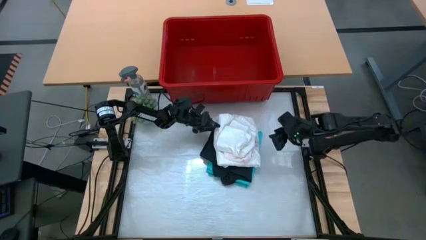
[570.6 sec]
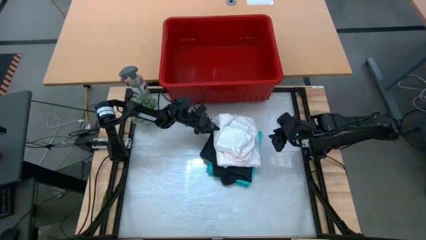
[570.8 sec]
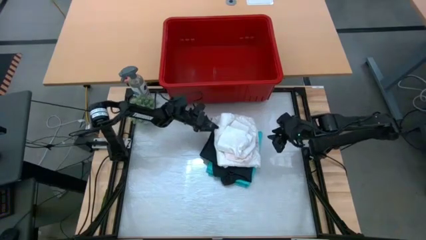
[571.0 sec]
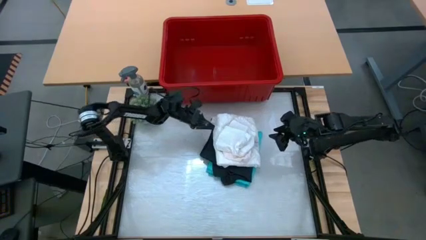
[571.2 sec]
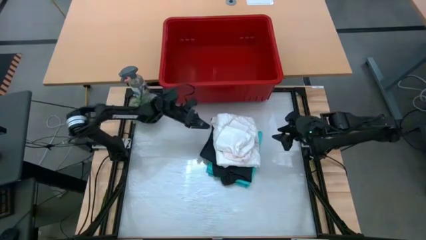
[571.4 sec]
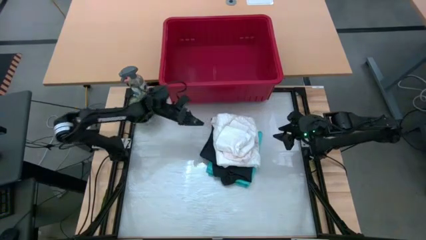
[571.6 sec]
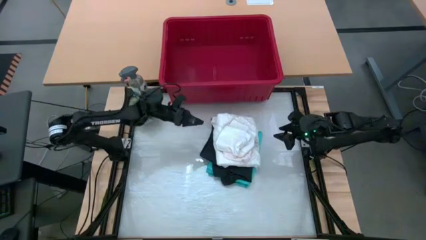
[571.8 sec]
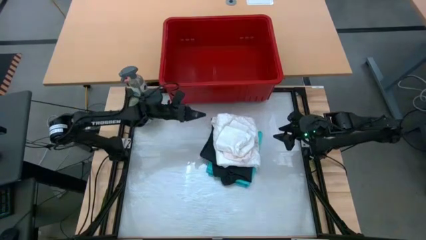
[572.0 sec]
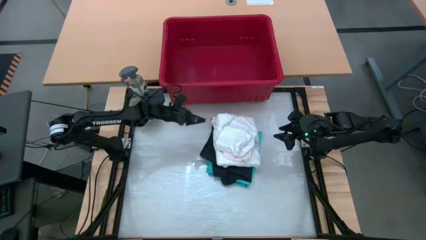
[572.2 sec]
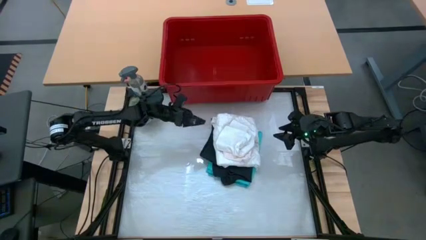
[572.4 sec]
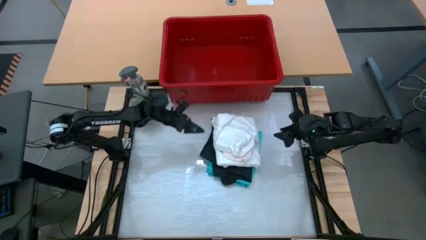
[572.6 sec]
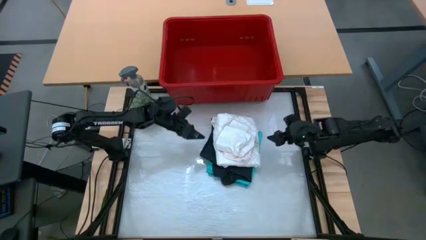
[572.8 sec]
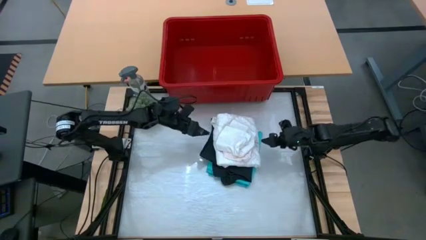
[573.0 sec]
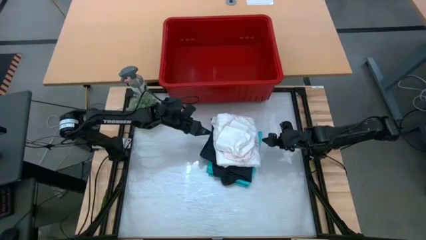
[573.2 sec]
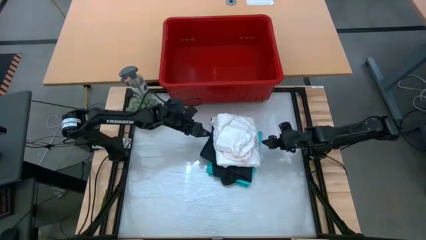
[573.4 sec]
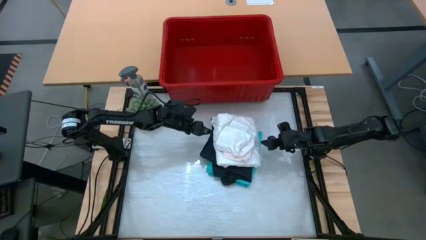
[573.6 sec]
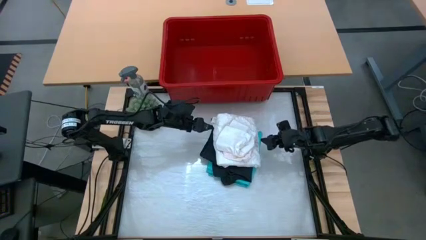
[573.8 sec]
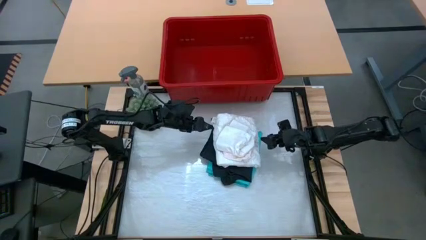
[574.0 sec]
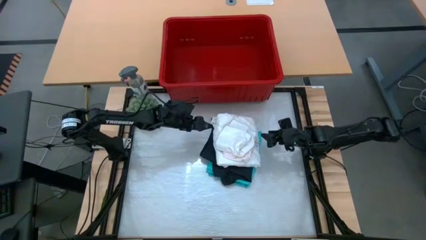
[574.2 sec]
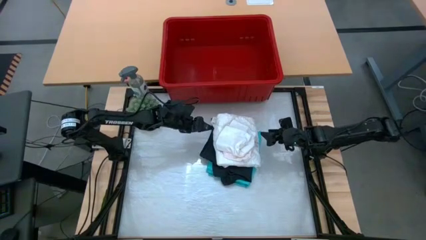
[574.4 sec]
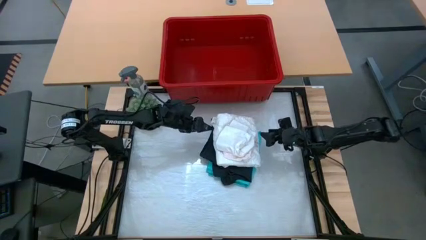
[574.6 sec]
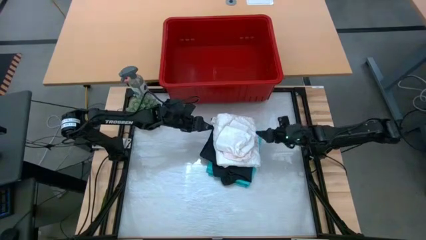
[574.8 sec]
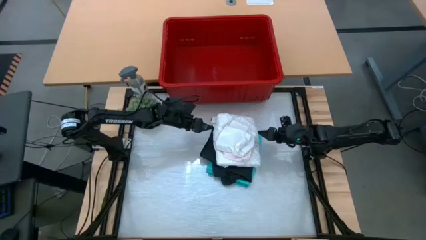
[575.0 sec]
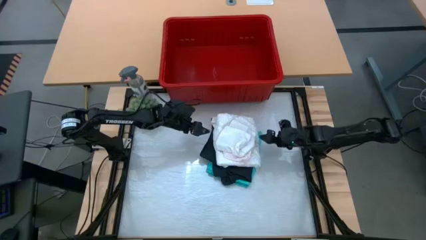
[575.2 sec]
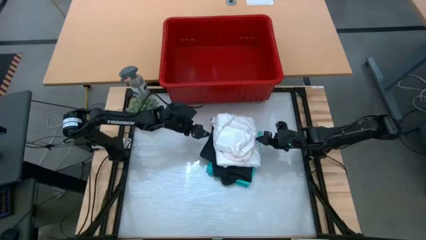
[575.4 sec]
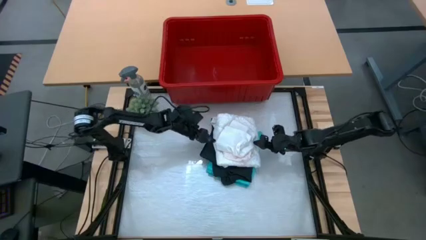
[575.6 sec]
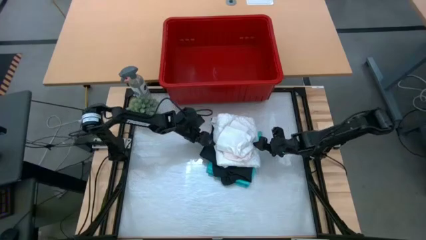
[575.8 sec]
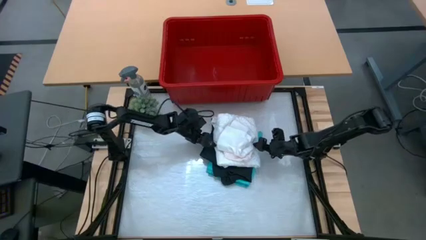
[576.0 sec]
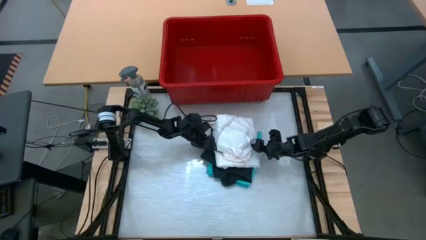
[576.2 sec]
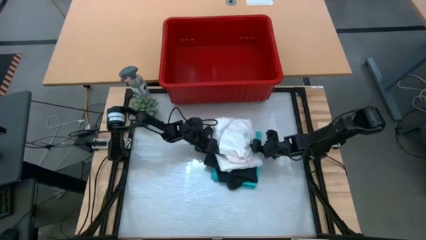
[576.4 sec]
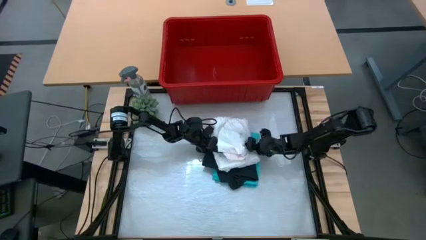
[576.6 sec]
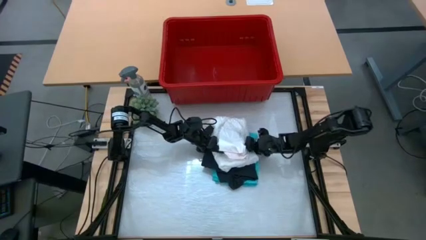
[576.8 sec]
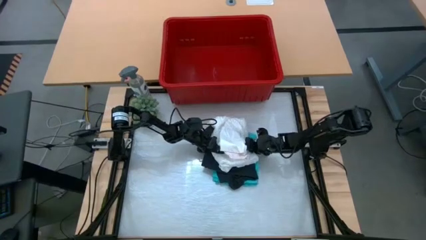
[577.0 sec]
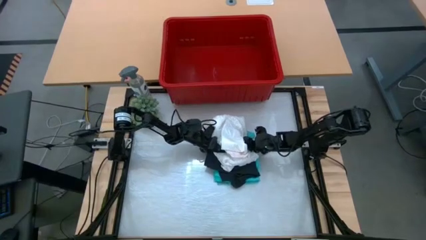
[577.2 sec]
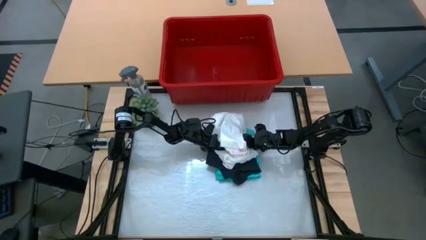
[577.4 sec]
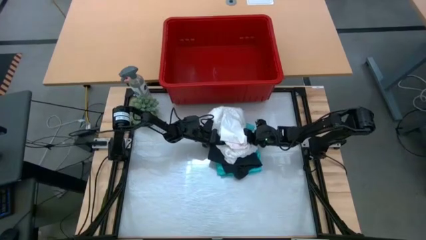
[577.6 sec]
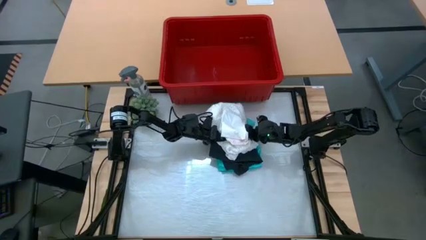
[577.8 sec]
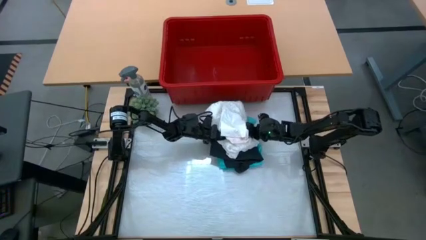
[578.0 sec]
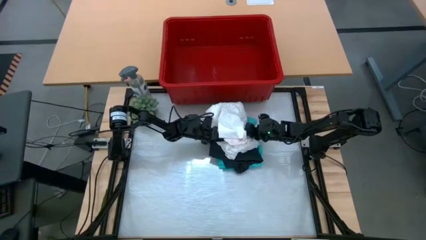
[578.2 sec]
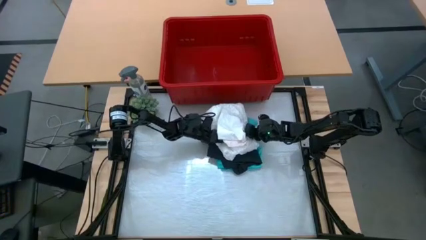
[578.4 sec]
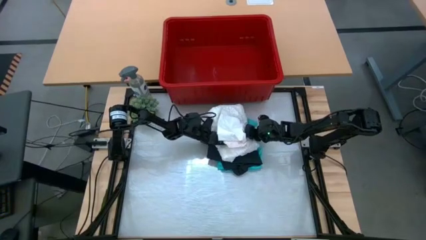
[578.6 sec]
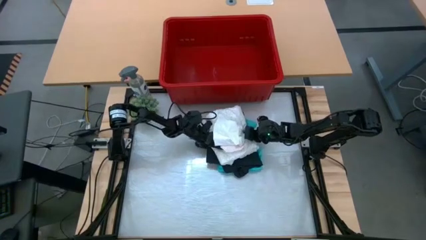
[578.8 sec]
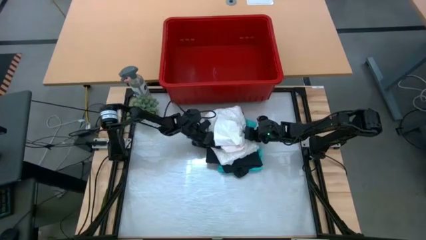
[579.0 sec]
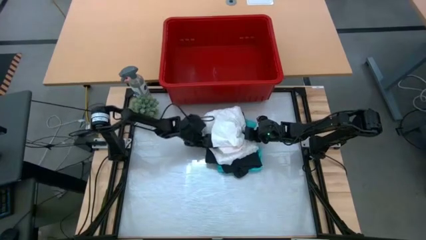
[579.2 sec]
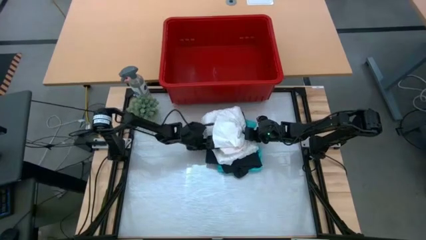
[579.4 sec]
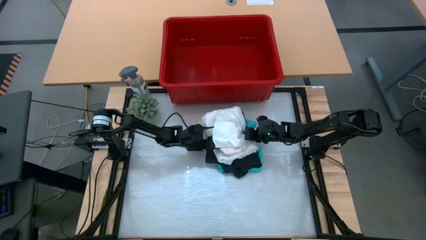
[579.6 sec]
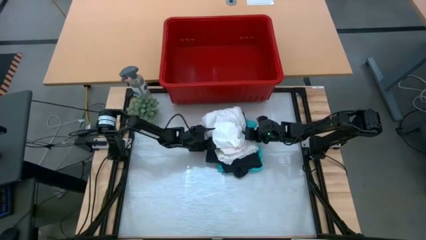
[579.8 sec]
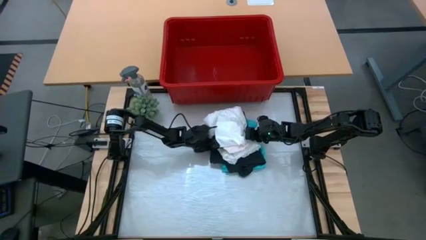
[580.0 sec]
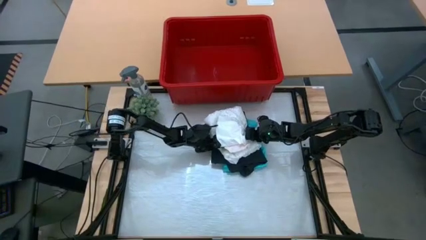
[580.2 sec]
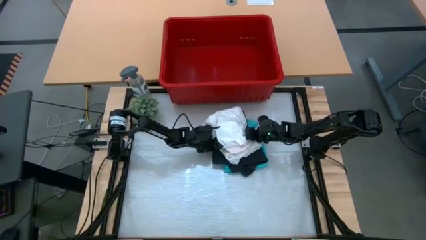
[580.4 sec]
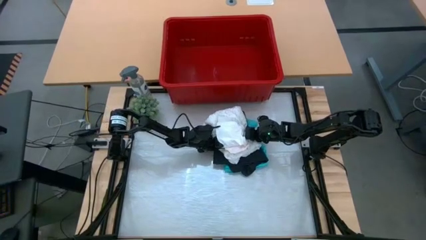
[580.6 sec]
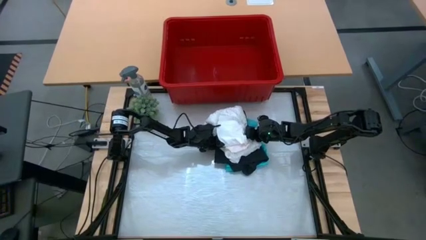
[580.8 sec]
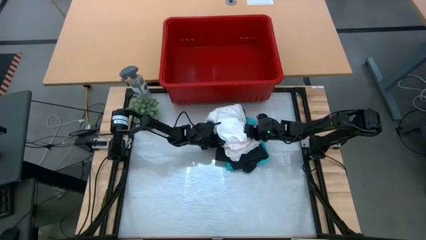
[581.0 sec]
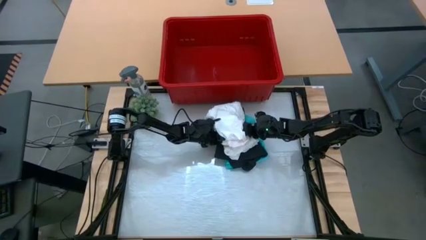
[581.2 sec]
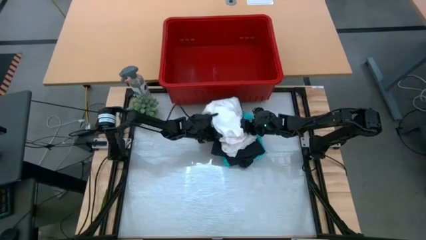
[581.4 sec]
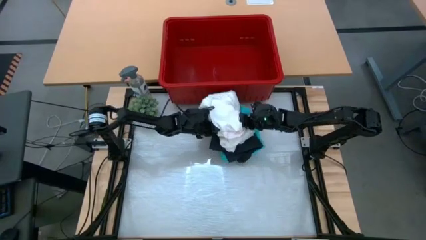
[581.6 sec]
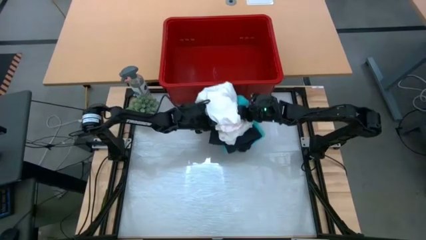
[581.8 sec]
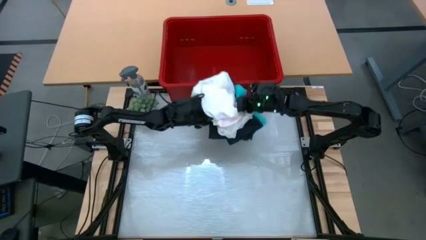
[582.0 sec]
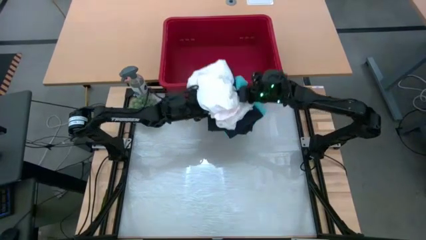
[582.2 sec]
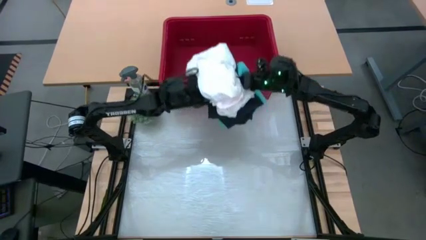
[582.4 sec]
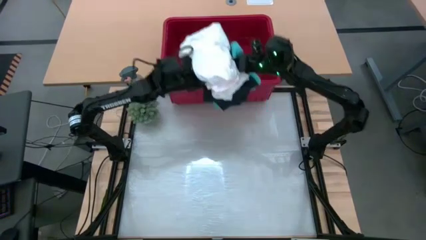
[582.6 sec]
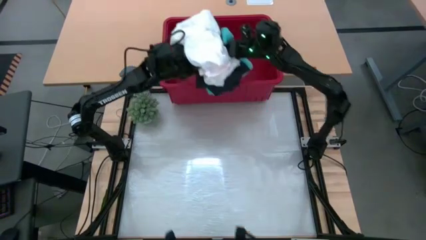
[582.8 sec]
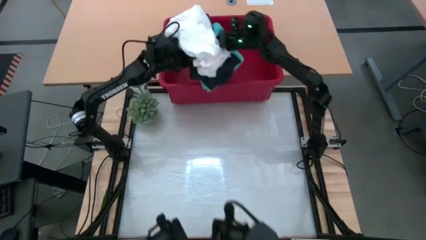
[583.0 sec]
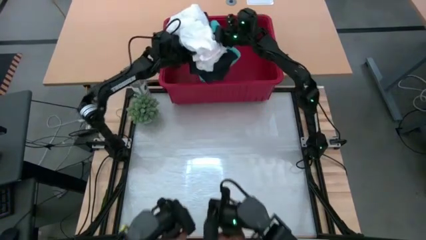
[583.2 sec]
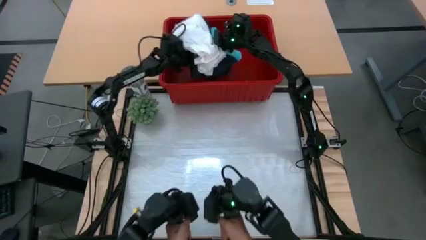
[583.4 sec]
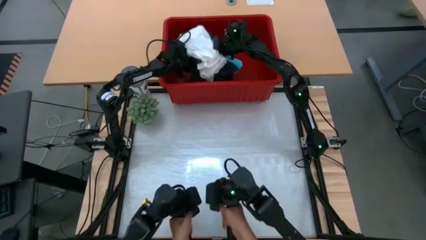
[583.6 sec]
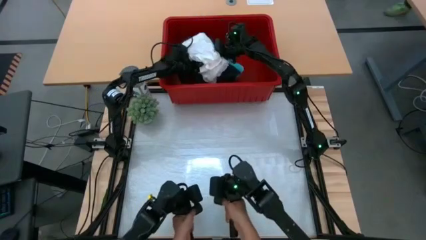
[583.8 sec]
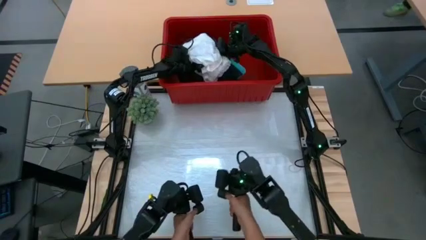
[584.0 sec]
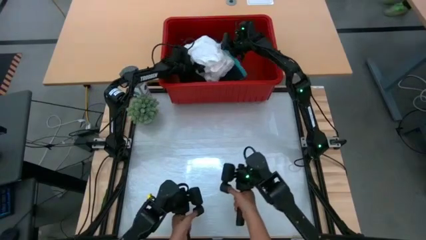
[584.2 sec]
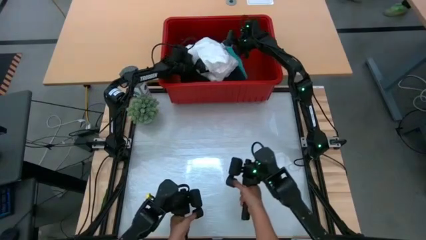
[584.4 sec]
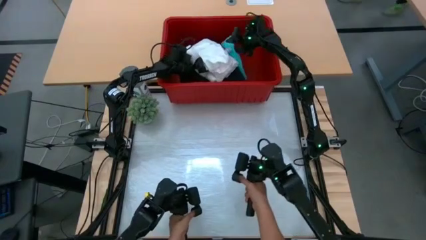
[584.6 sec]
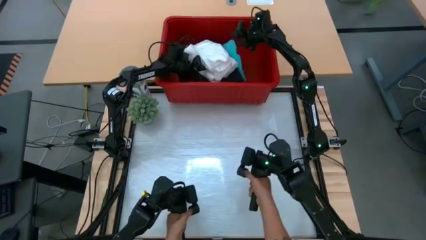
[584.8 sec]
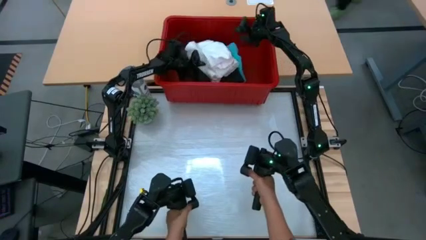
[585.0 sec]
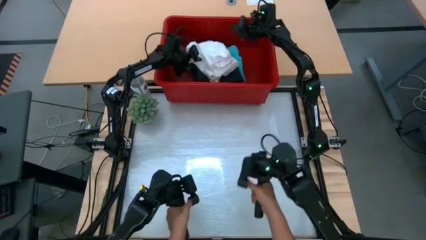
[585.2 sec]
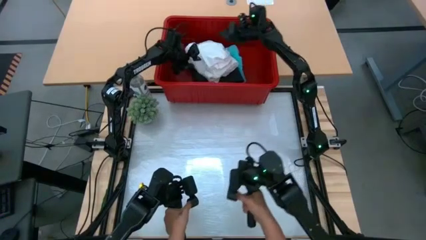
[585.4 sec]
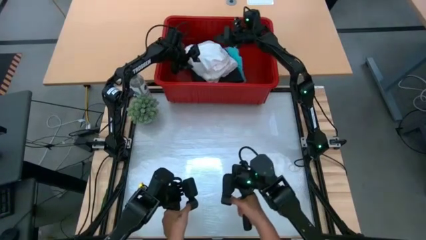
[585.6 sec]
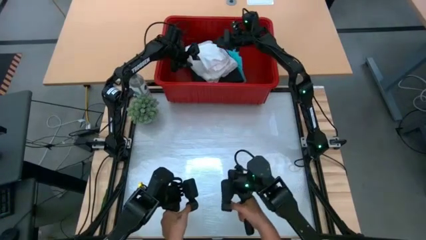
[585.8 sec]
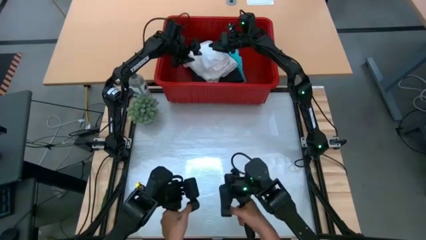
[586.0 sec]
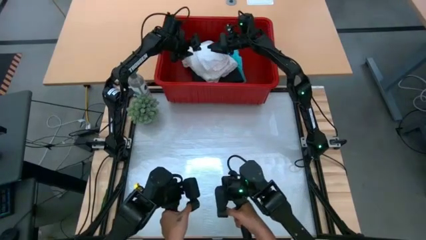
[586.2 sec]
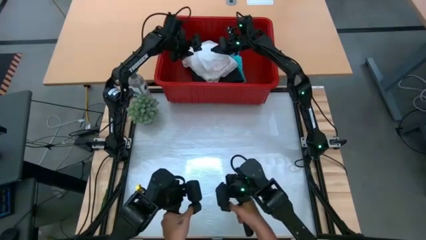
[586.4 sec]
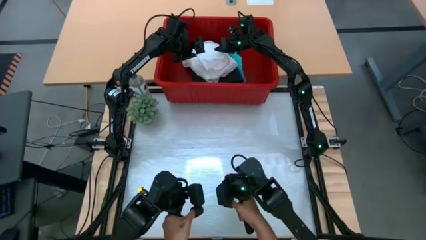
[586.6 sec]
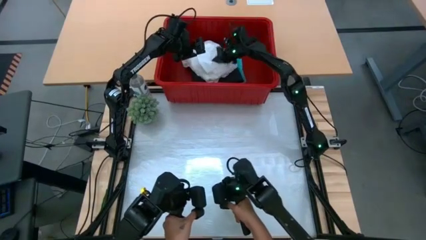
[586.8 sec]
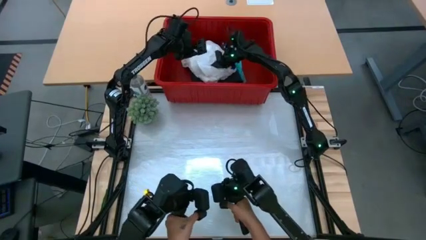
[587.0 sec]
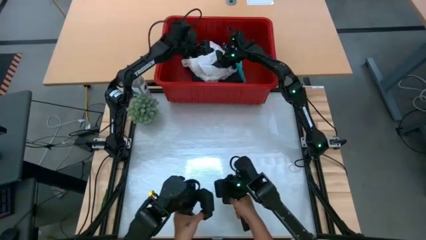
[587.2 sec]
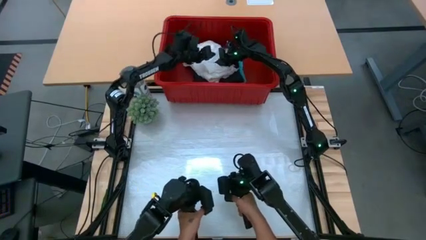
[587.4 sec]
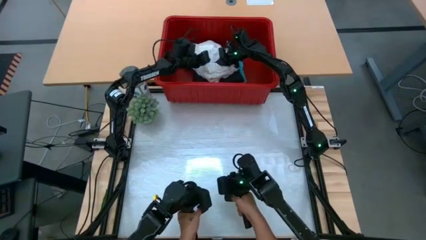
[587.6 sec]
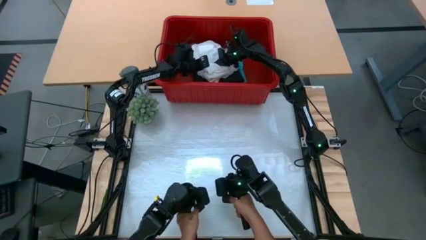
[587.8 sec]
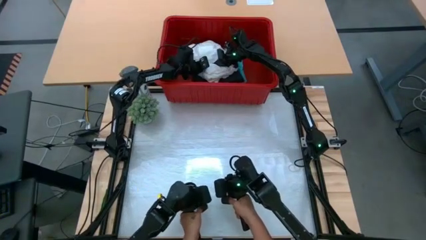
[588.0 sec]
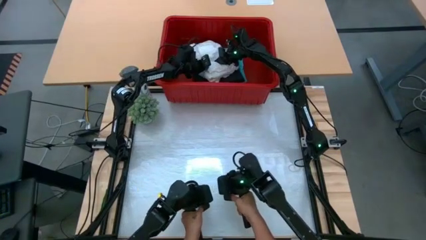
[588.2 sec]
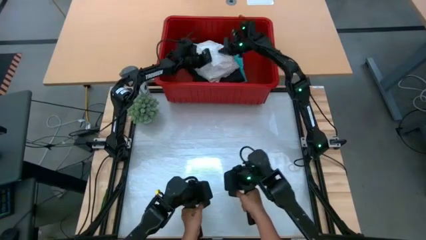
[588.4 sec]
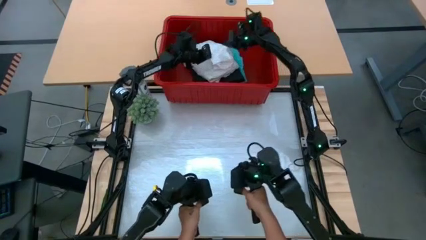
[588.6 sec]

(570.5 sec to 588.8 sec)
Task: Fold Laundry from Bin
Put the clothes into the red organizer bin
